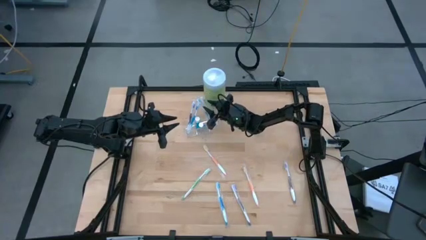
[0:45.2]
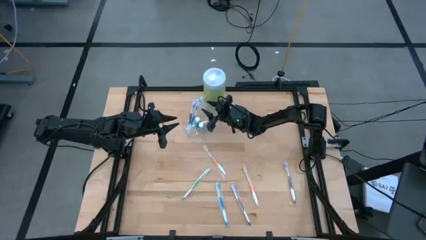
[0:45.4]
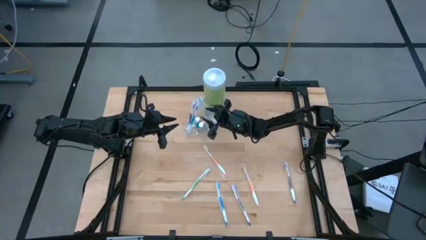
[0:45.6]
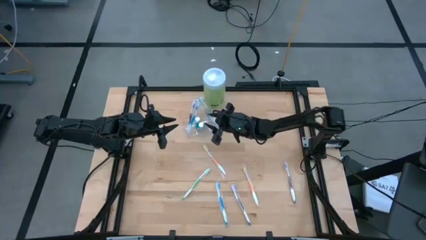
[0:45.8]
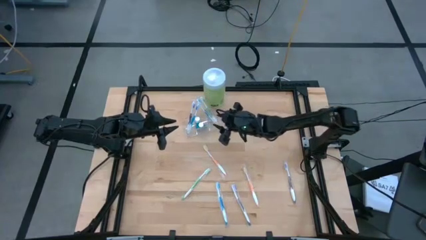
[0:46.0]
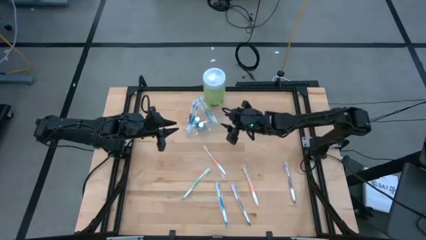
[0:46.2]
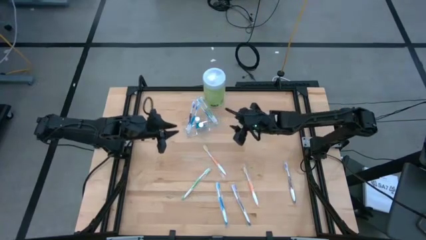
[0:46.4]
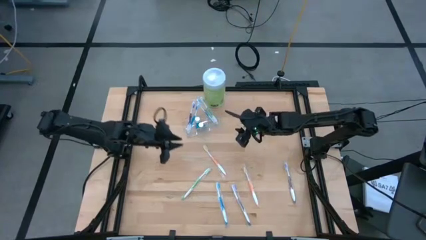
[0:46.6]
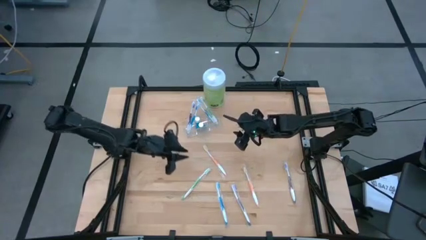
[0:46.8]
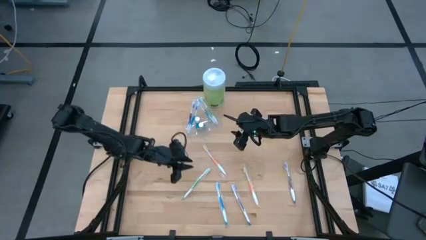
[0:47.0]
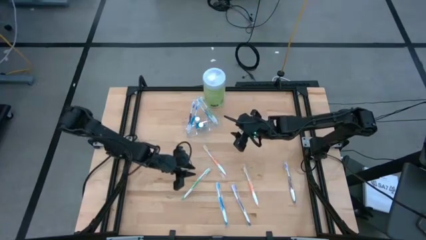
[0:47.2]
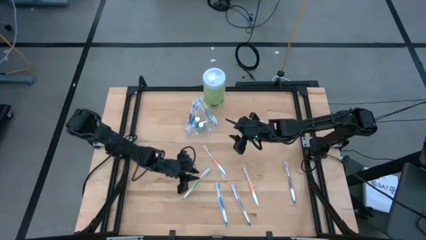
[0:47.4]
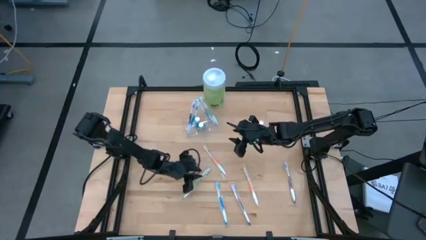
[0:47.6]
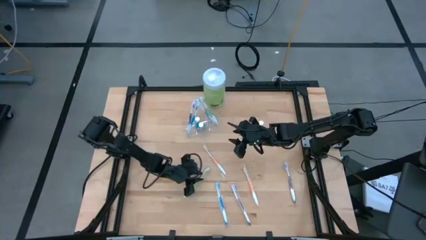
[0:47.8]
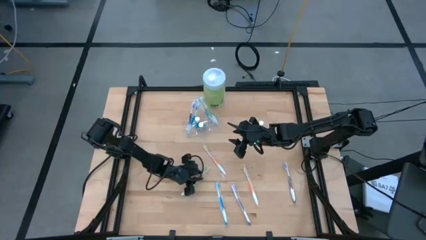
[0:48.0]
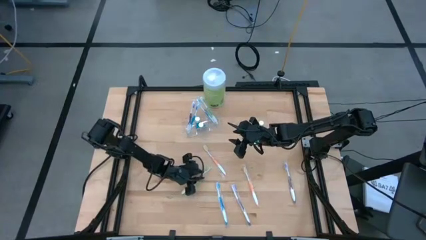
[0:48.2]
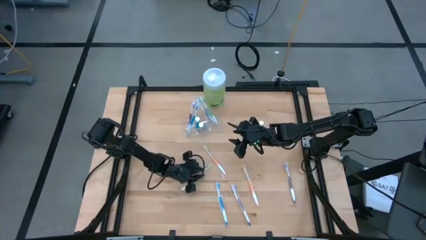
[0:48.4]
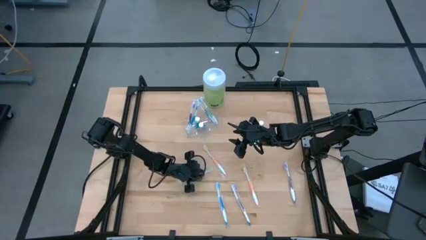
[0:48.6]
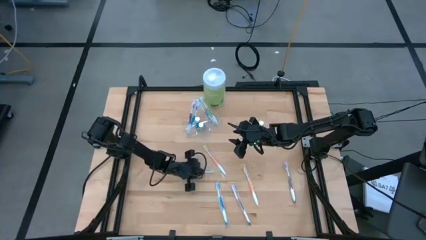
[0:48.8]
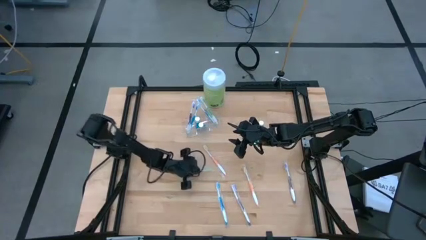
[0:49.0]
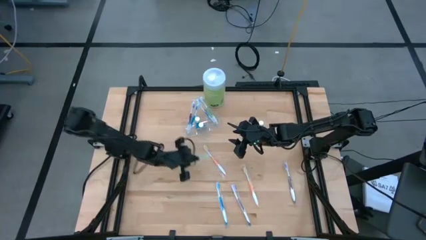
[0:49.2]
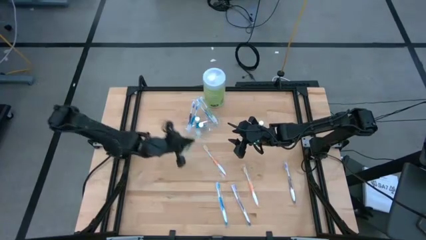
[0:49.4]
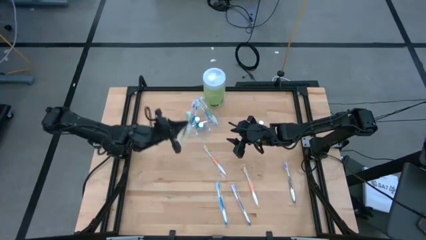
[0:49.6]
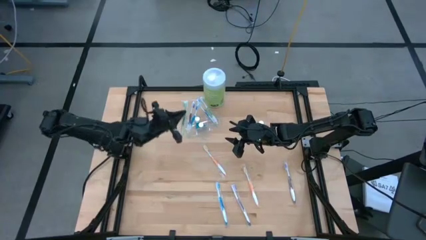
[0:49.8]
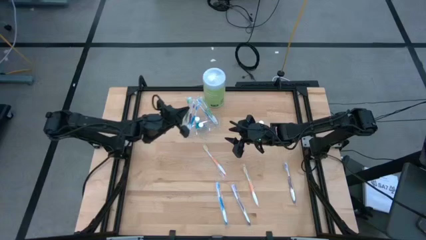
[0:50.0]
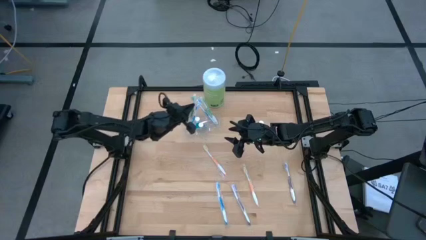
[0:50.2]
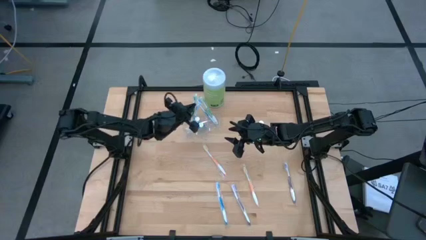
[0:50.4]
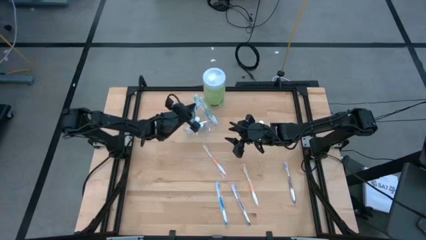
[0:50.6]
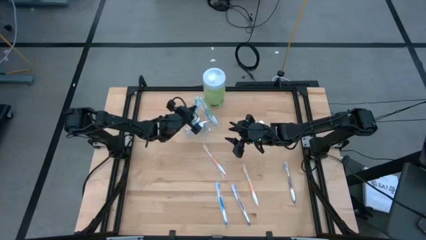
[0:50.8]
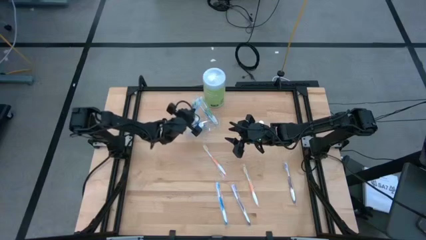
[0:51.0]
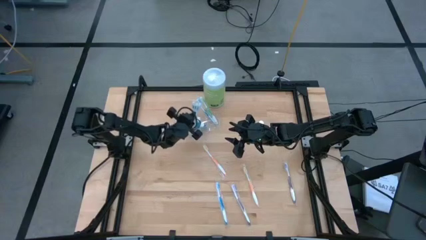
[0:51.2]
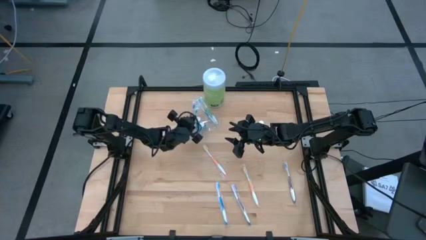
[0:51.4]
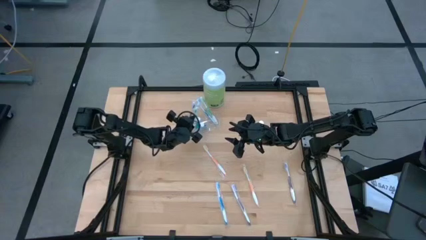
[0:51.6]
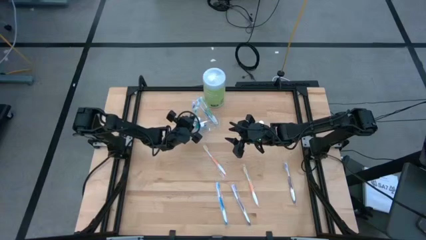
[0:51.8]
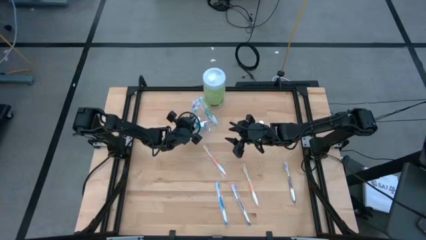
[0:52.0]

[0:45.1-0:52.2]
Task: Pick & Place toothbrushing station
Put the green toothbrush into the transparent organizer

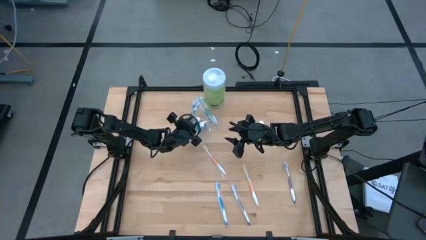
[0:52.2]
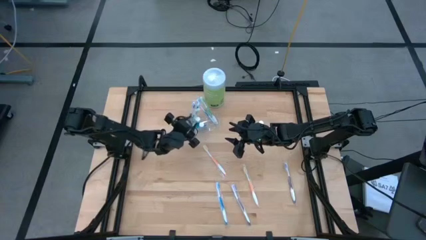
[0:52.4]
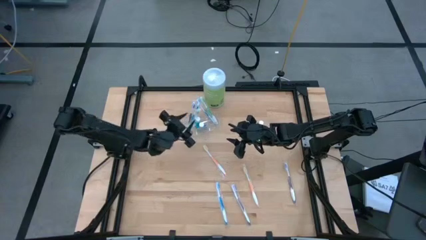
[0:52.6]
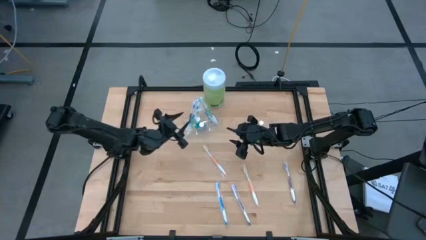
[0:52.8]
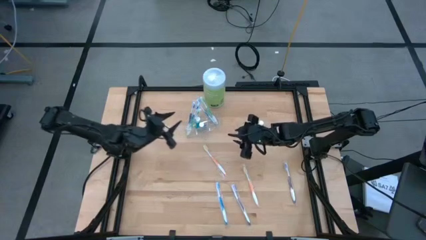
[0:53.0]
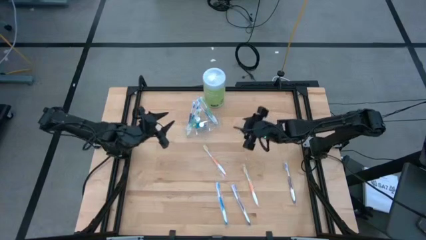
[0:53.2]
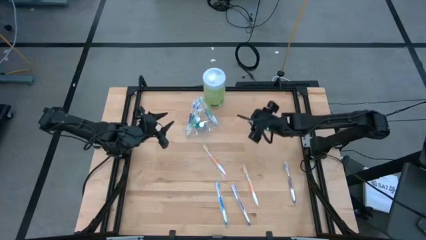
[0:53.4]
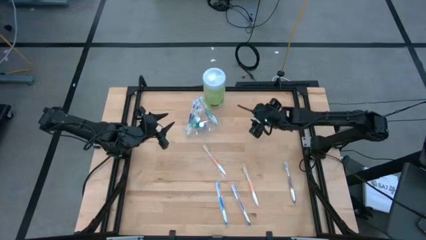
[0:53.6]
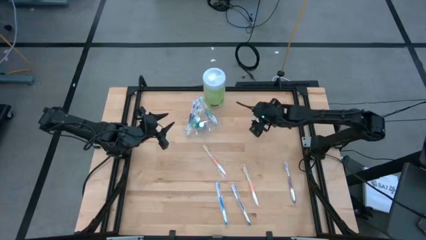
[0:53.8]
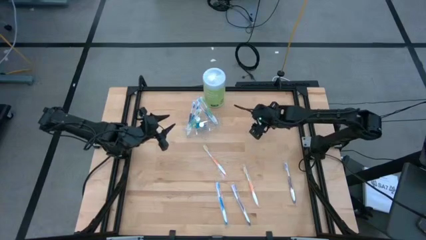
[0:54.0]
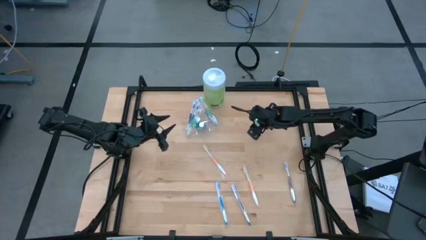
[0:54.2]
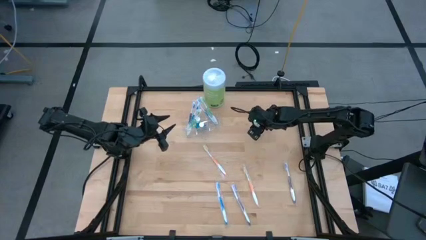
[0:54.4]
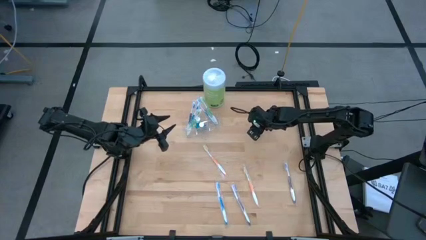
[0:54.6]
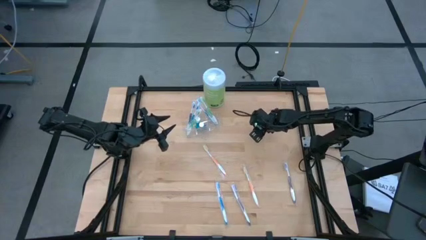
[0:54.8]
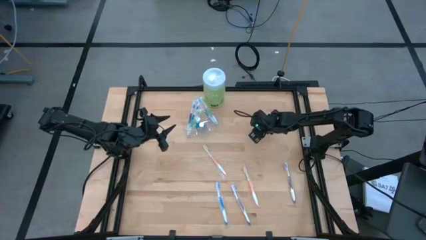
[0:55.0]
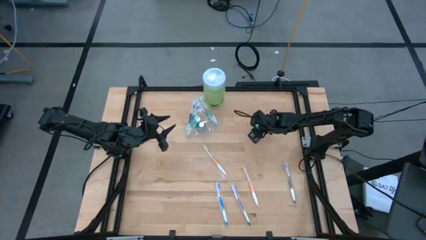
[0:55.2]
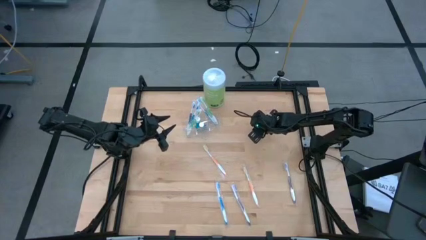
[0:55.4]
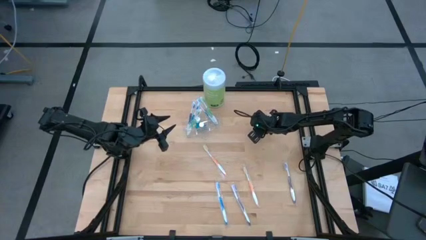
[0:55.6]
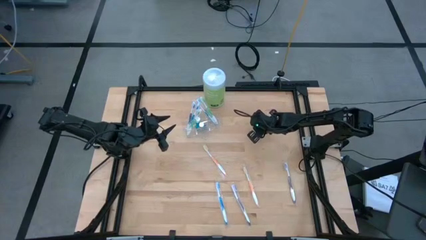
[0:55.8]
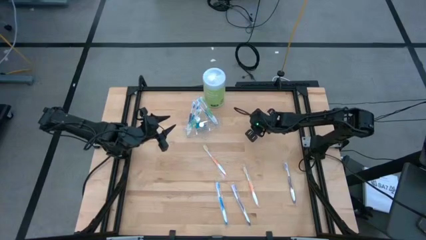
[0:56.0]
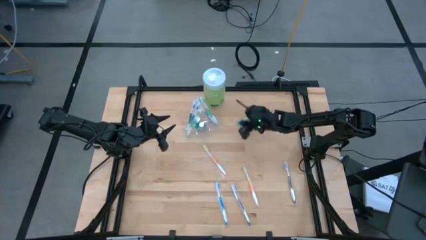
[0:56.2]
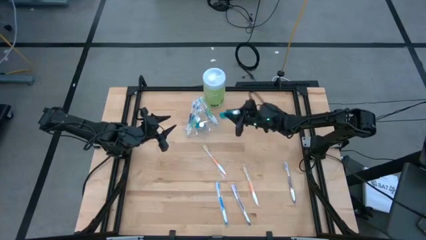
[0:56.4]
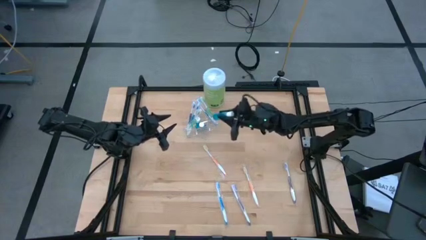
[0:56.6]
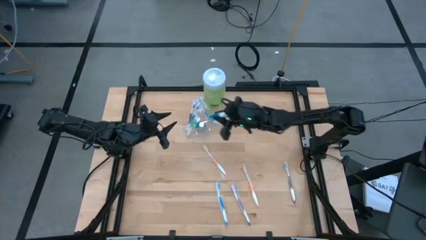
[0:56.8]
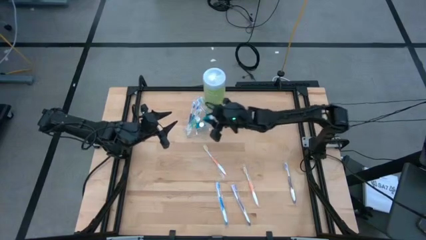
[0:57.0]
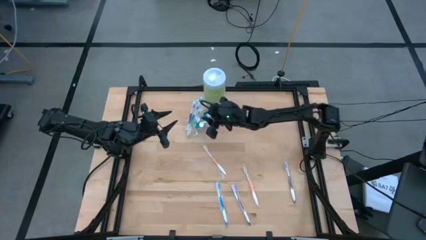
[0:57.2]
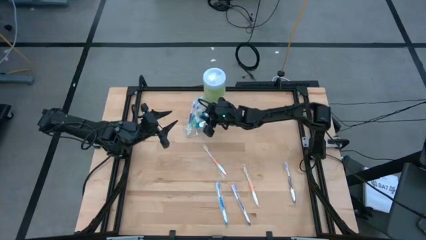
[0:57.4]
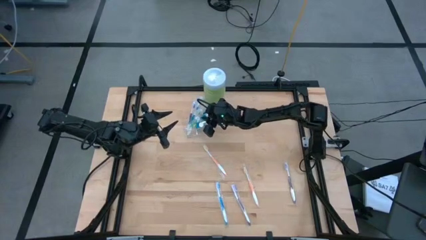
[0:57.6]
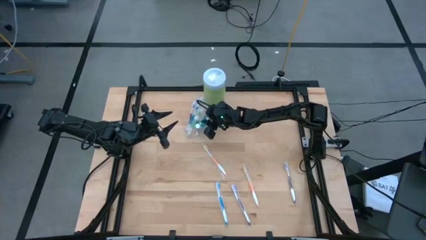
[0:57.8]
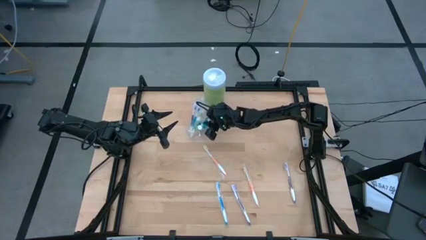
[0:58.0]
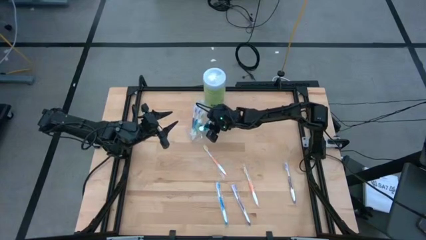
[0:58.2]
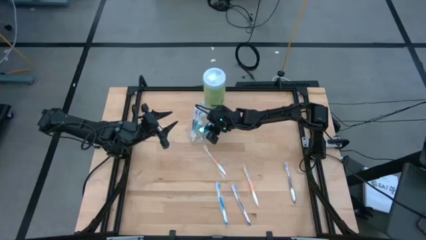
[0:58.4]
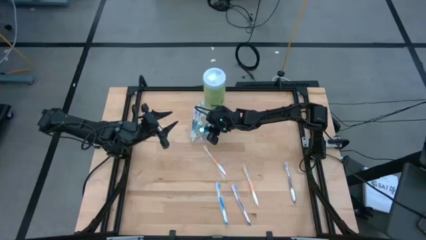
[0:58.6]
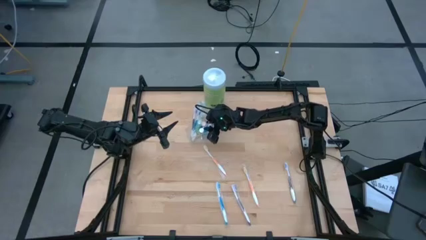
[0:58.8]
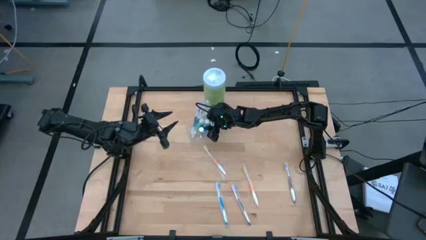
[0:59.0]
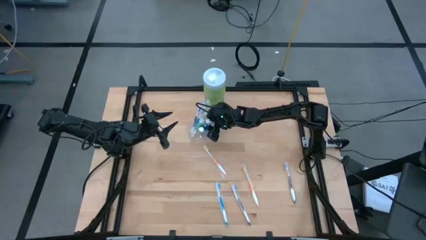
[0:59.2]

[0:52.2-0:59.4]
Put the mouthwash into the transparent organizer

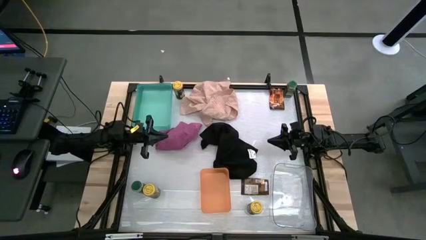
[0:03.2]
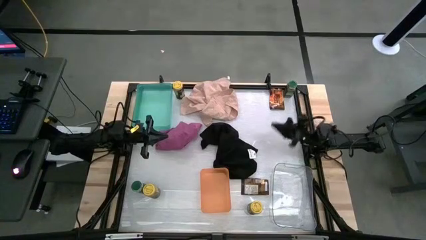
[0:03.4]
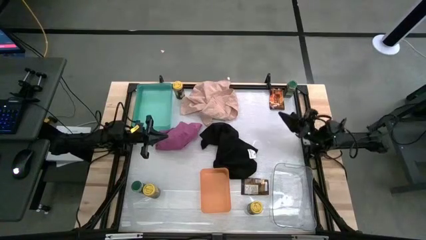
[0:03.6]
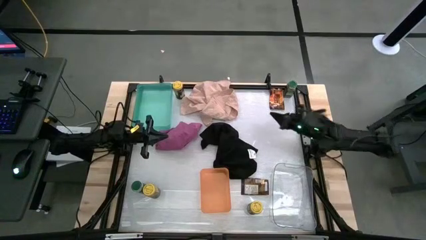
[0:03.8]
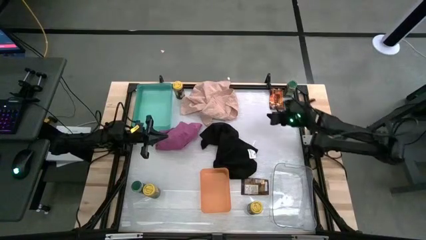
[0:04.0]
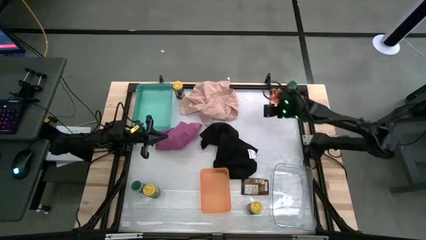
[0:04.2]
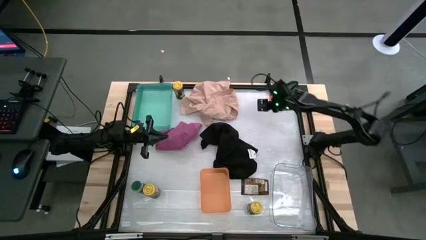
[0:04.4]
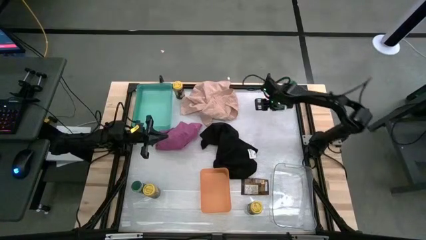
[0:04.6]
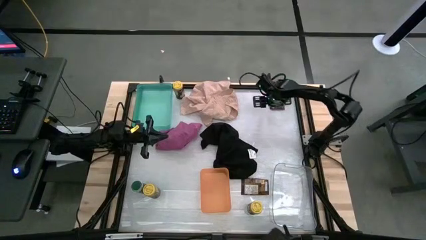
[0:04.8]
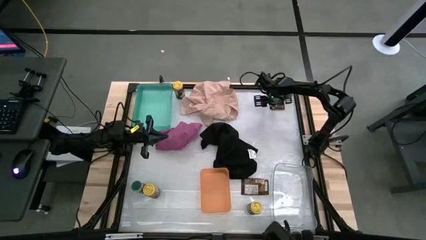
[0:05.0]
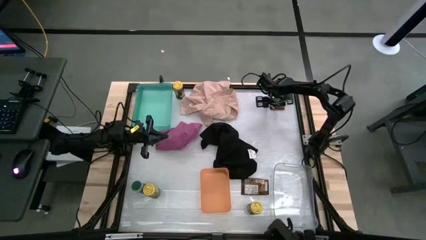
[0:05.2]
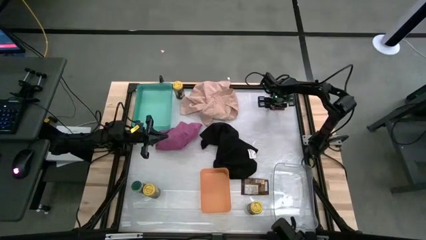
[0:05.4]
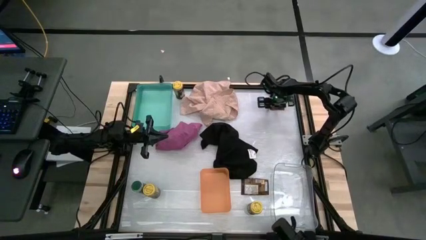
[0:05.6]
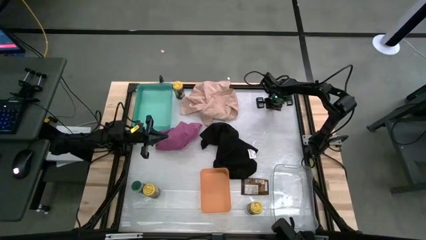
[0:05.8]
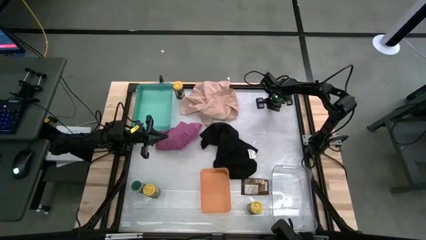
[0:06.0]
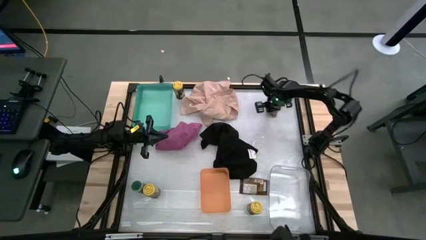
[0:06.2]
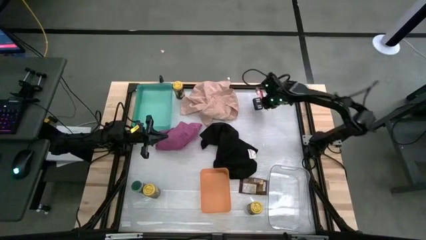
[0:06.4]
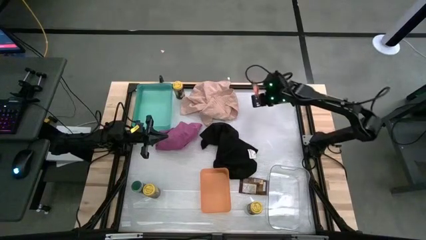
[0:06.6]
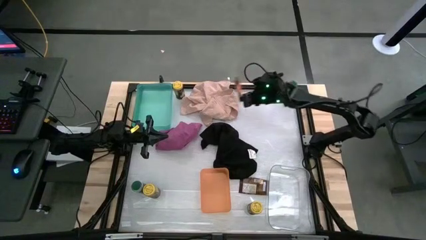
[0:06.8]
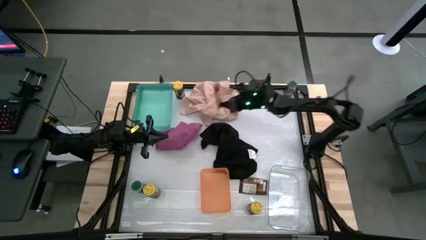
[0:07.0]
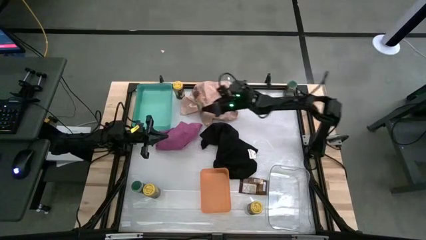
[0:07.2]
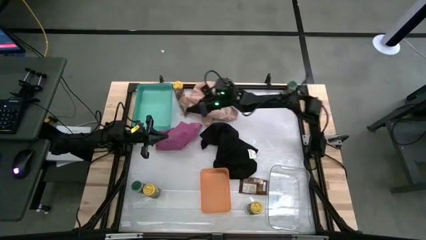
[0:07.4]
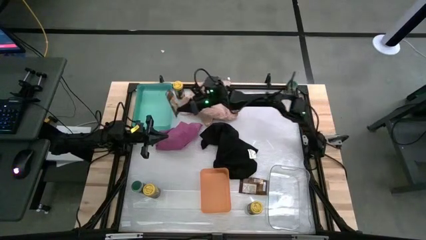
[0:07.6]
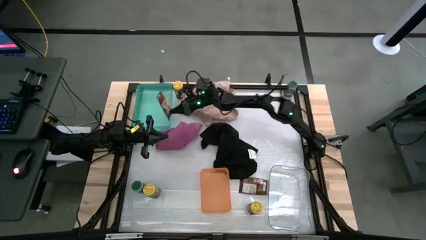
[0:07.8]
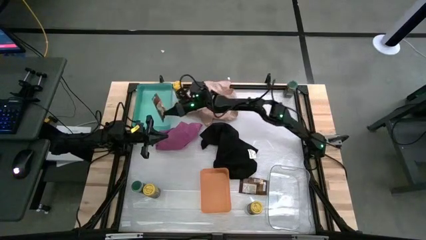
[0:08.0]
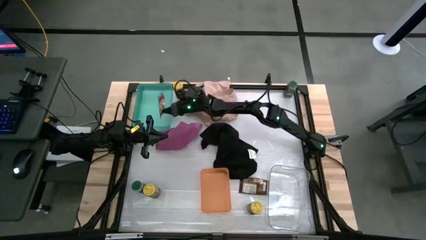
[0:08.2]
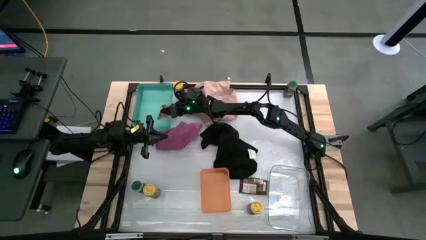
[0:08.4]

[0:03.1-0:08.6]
Task: Sort spices by type
Put the top orange seasoning pack into the blue bin
